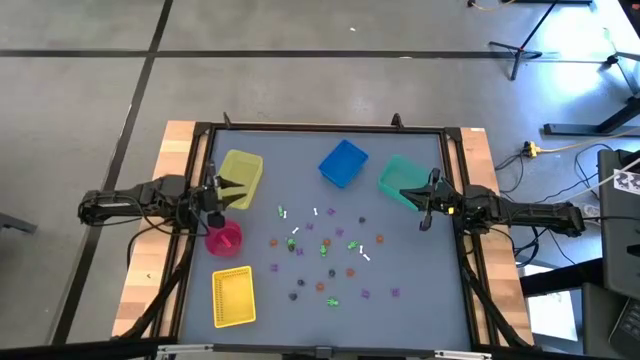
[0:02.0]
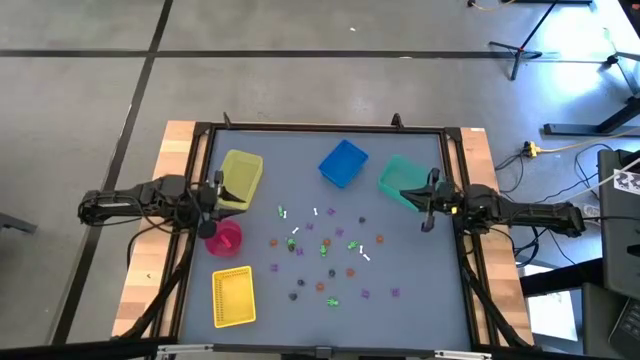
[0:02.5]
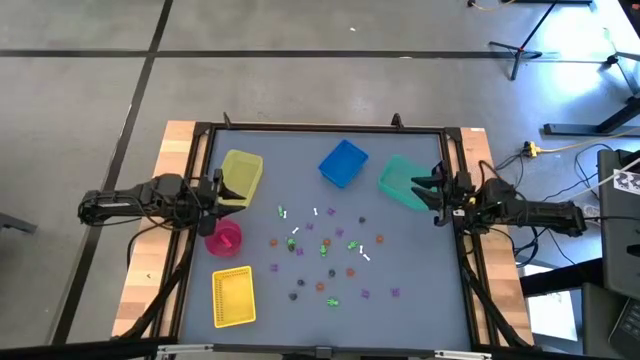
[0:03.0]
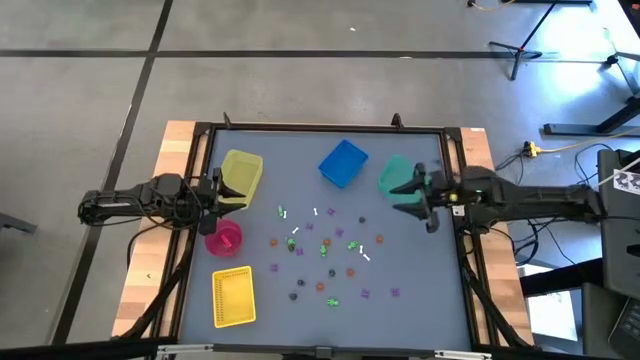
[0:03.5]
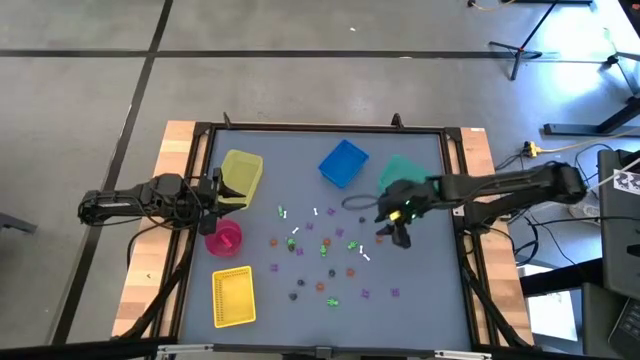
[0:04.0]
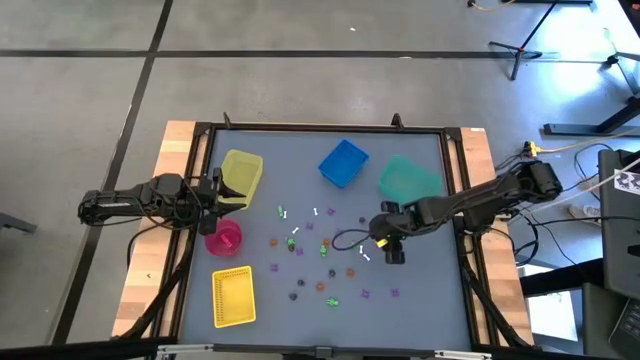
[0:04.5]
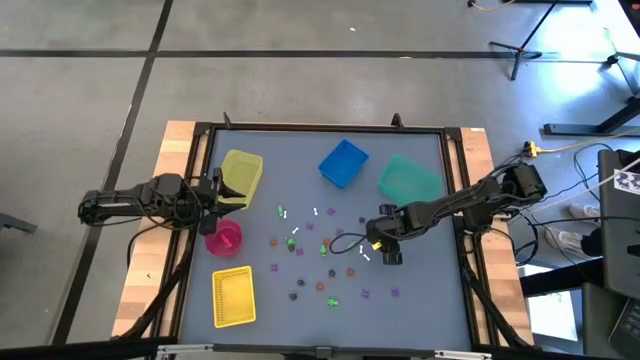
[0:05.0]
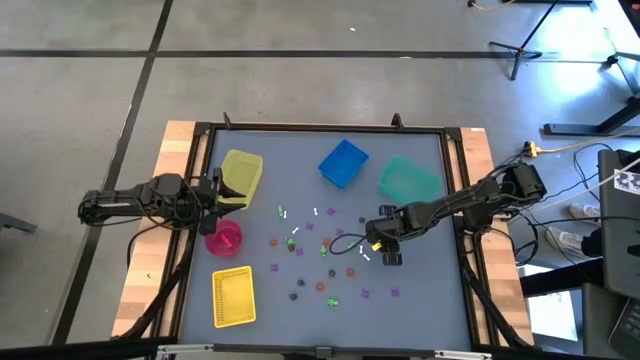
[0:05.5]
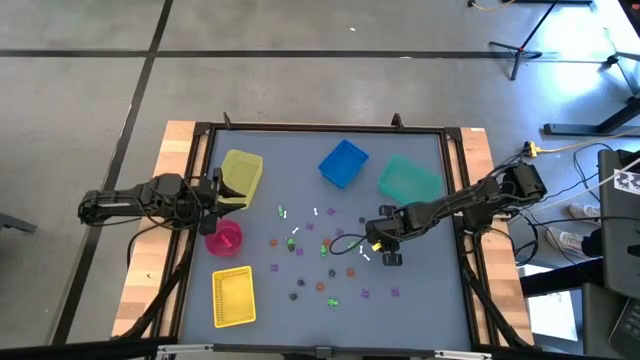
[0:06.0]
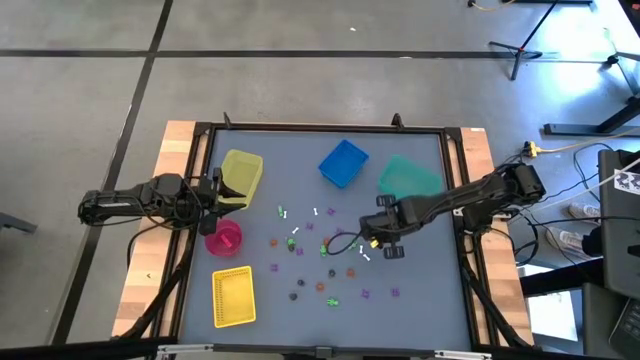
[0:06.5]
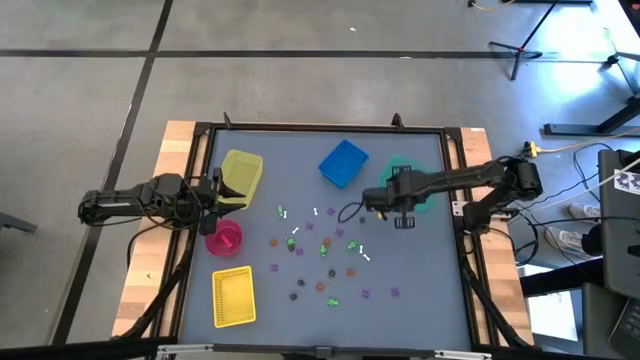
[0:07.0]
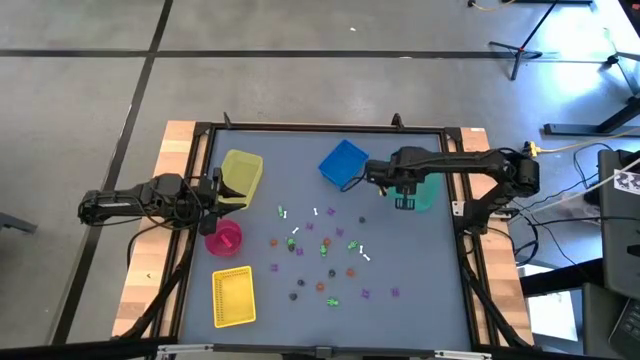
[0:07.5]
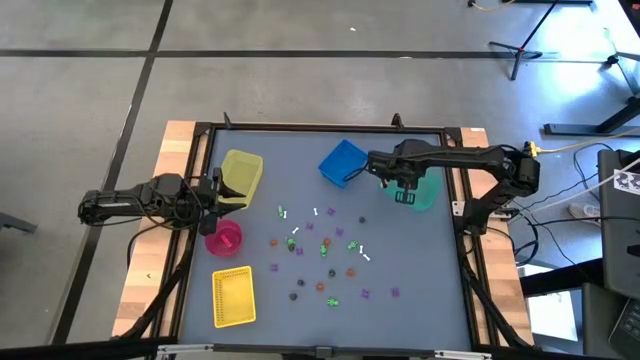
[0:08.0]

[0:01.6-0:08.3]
Task: Sort Halloween decoration
Put the orange pumpkin toy into the green bin

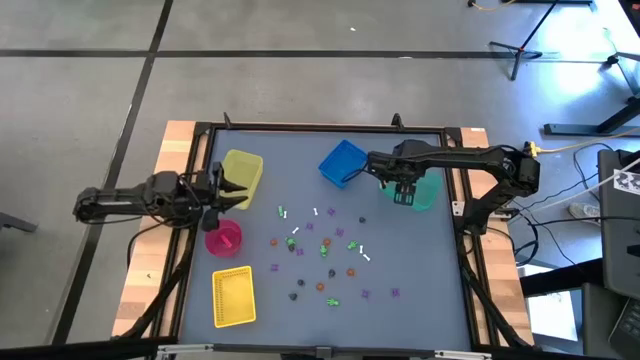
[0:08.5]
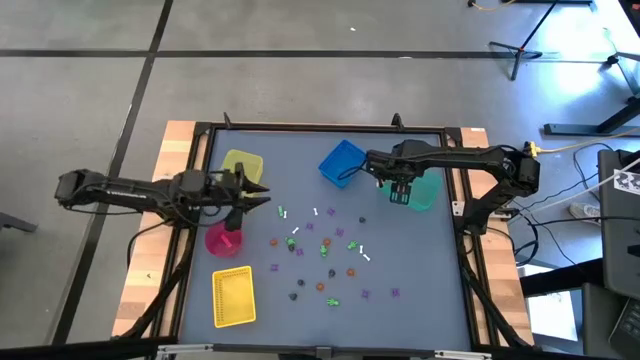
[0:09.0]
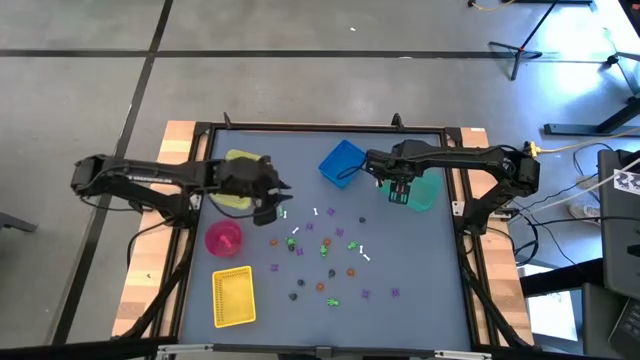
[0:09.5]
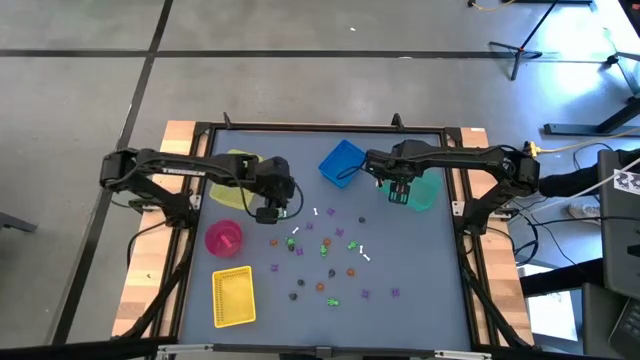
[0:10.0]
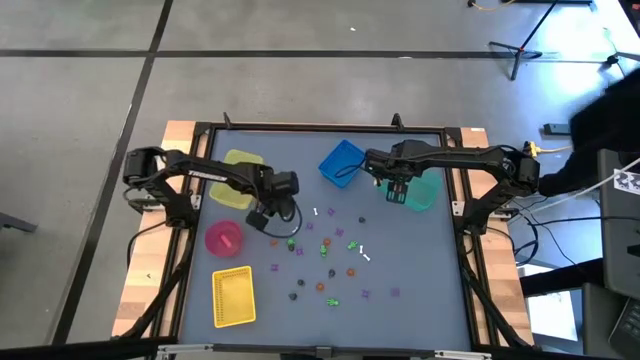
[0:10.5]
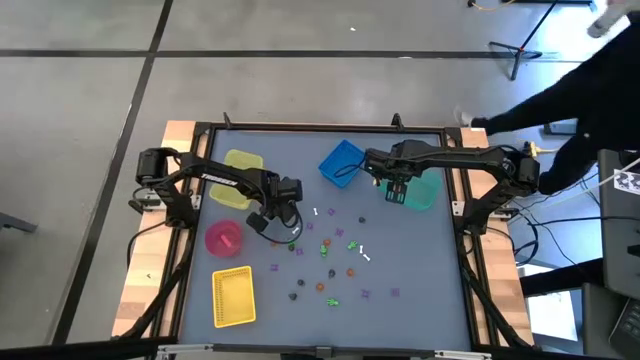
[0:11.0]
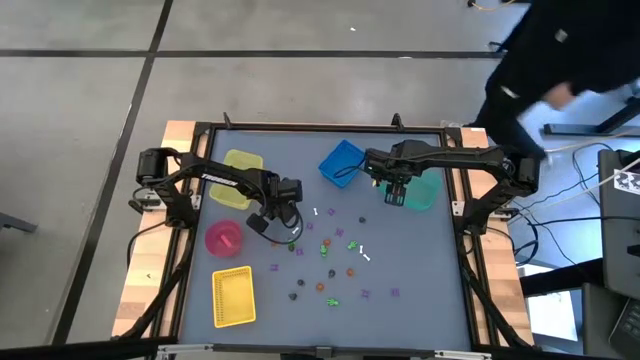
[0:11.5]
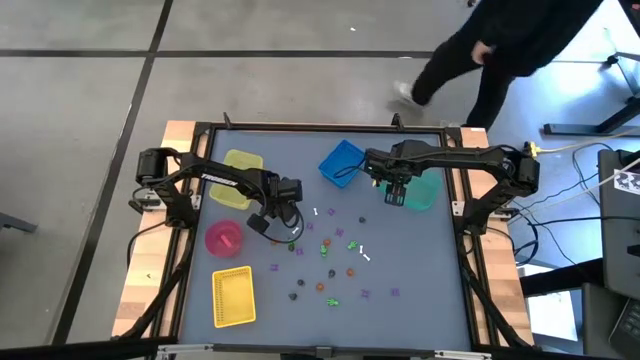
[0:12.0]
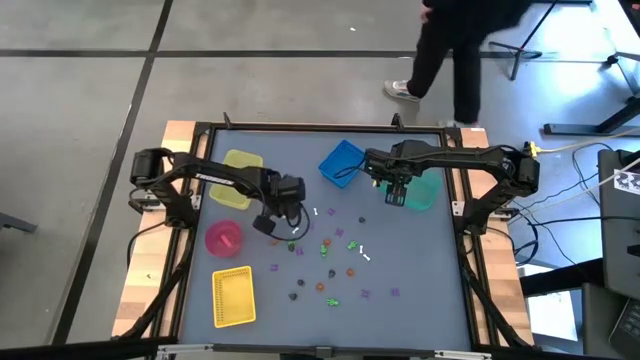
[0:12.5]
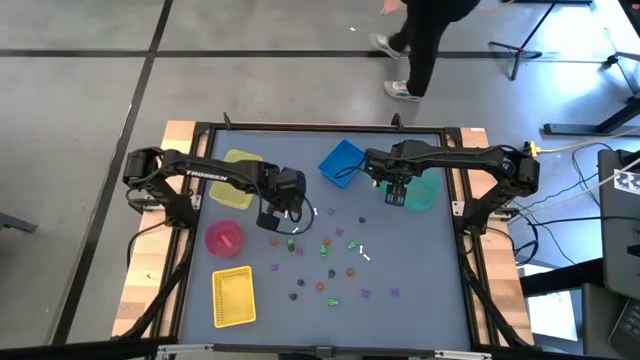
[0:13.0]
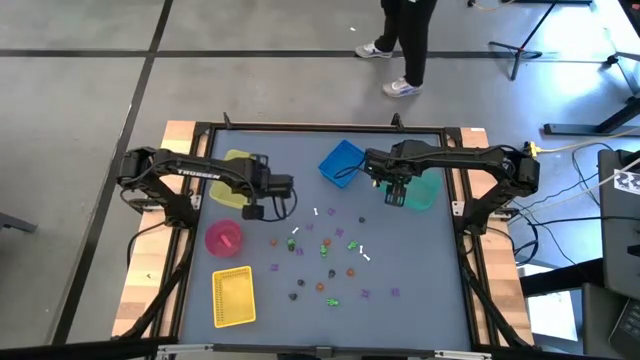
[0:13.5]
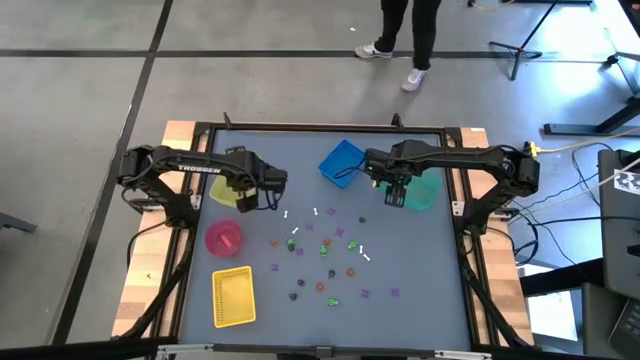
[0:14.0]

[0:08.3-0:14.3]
Put the green skeleton toy into the yellow bin

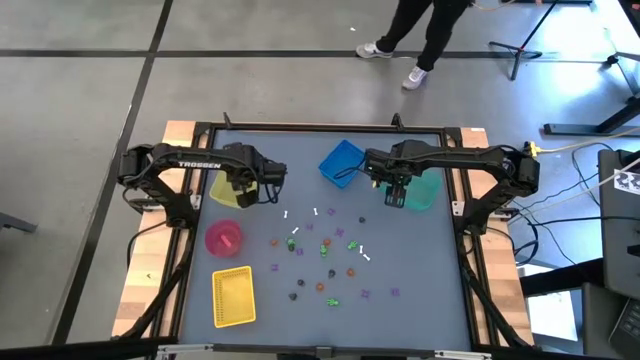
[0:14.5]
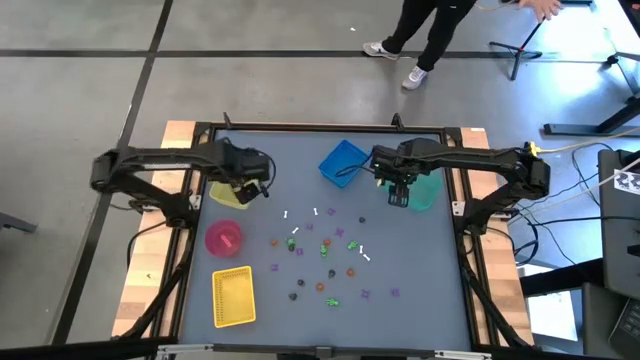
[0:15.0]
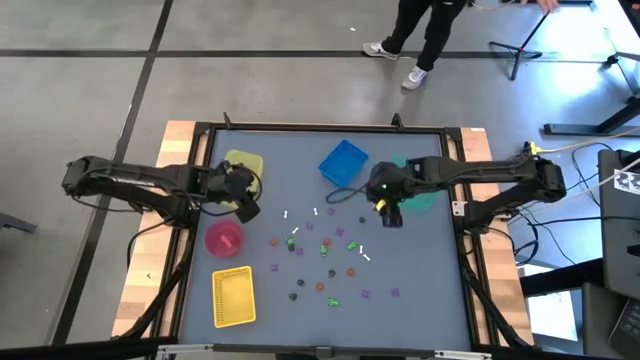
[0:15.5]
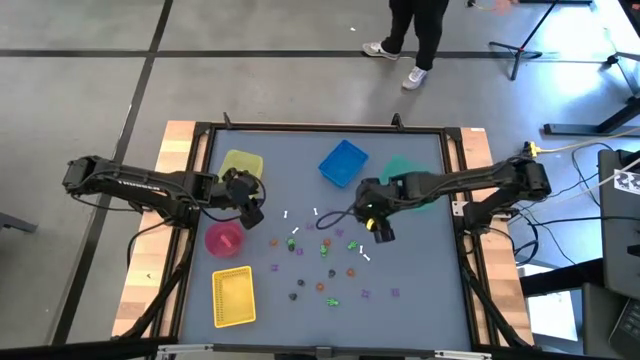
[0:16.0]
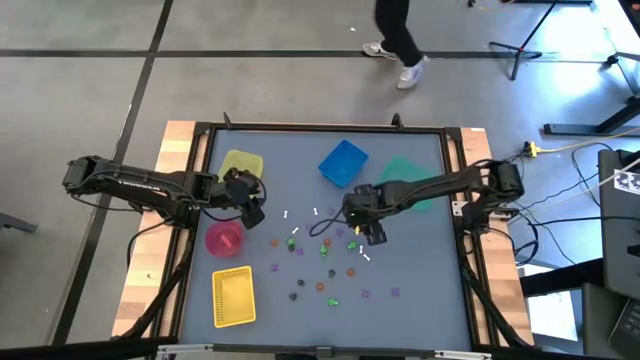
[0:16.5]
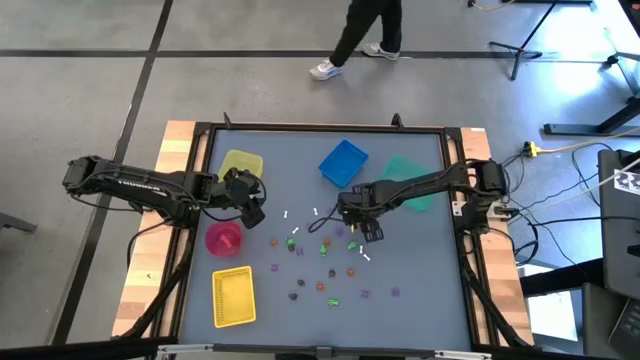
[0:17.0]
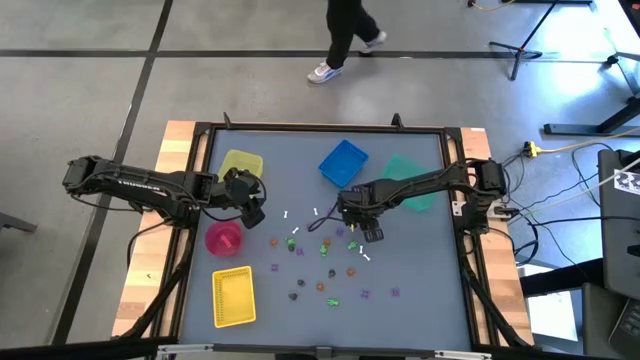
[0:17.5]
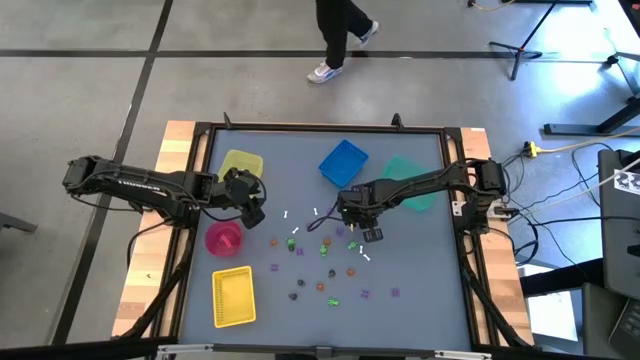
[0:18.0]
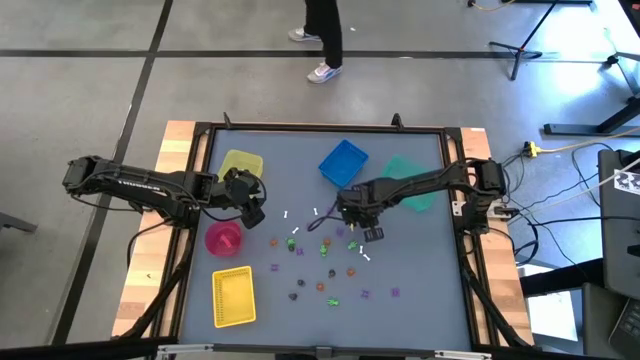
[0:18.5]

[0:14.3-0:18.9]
Put the black skull toy into the blue basket

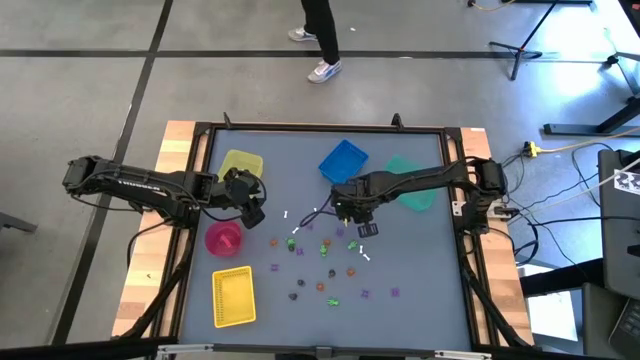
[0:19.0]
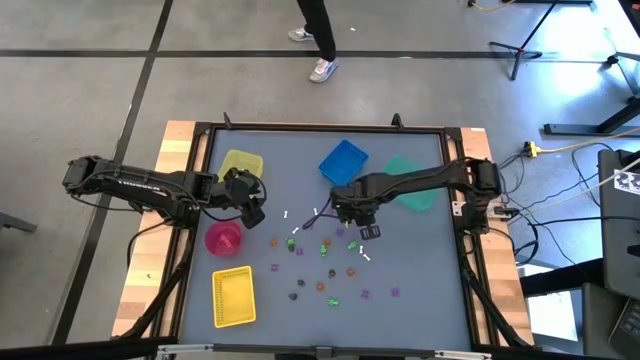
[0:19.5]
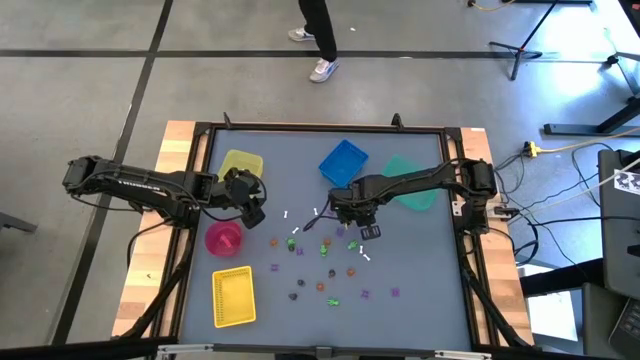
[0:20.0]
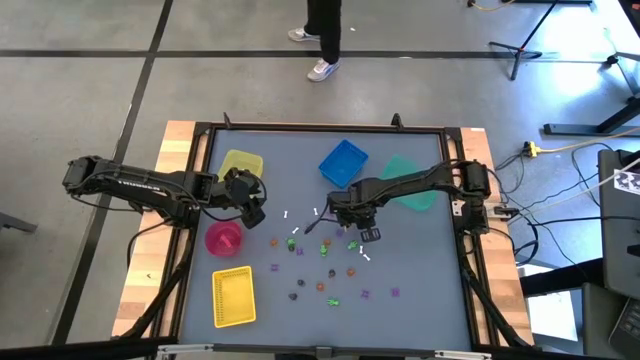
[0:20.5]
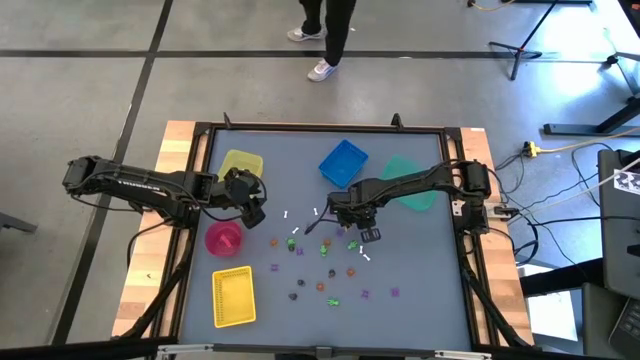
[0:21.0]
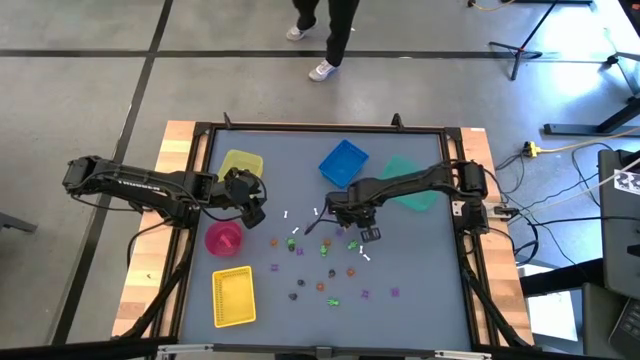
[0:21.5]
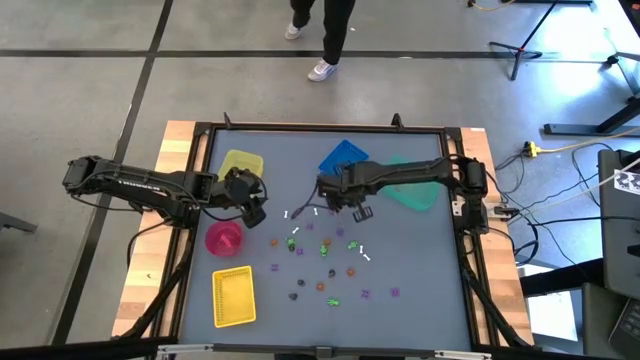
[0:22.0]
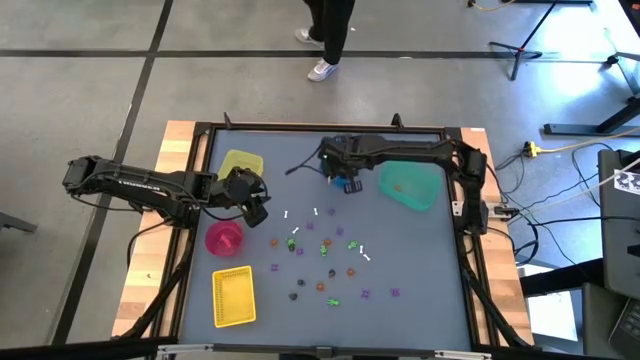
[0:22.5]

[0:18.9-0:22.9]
Put the black skull toy into the blue basket

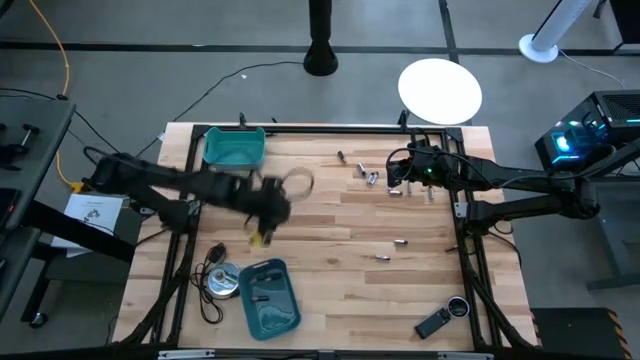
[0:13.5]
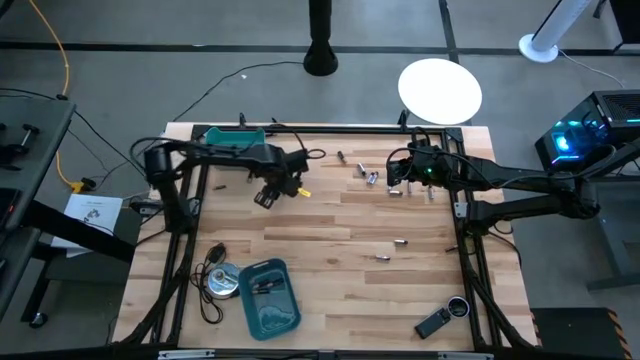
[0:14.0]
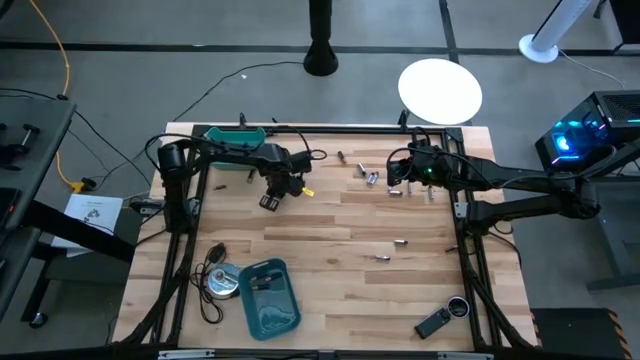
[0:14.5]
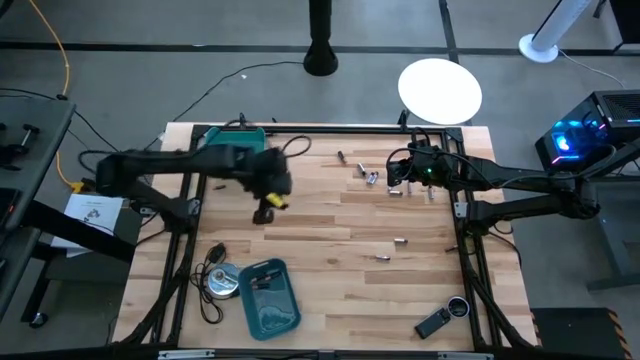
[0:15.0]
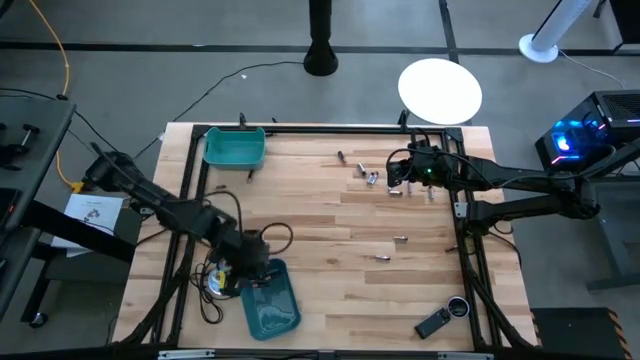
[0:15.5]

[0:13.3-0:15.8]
Task: Sort batteries
Put the black battery into the blue bin
